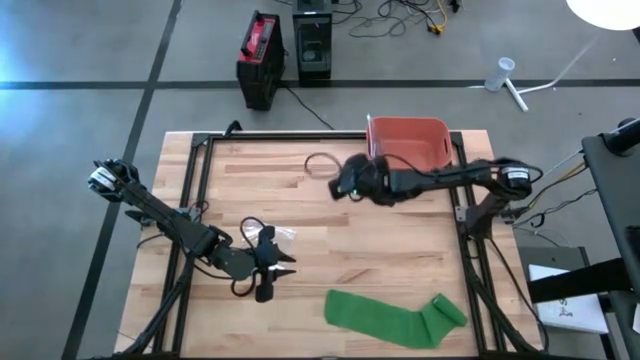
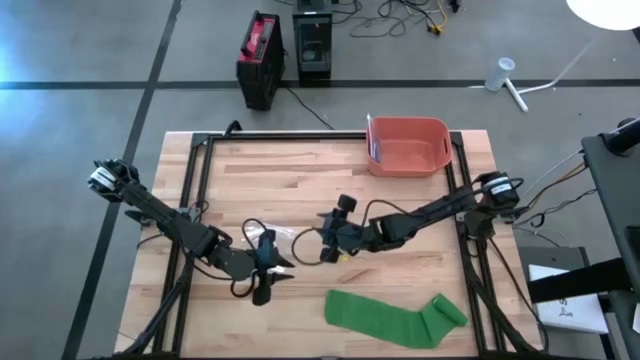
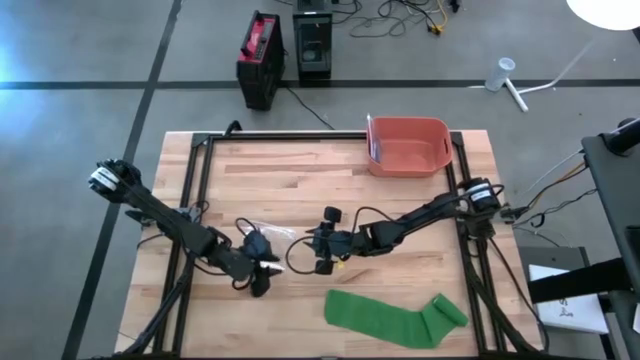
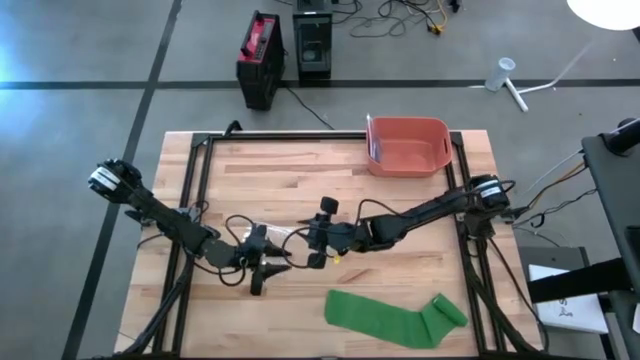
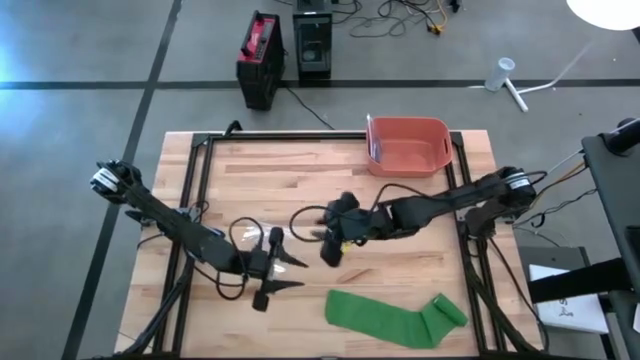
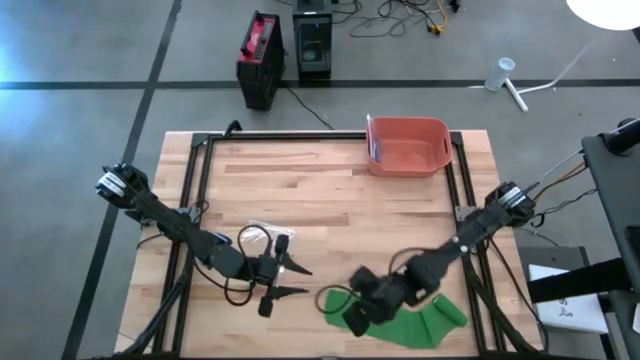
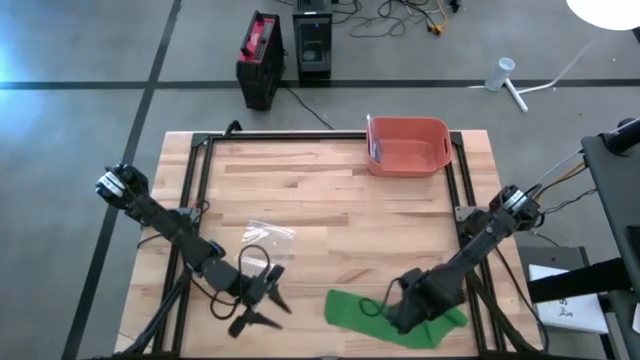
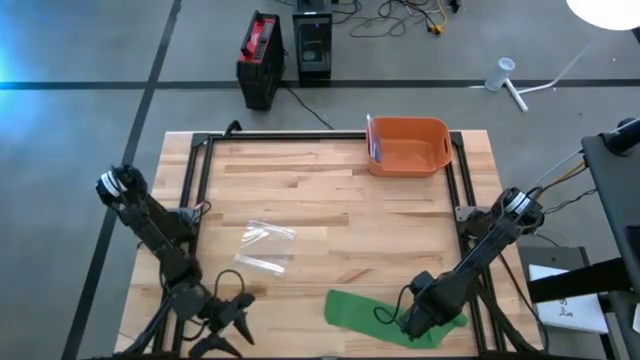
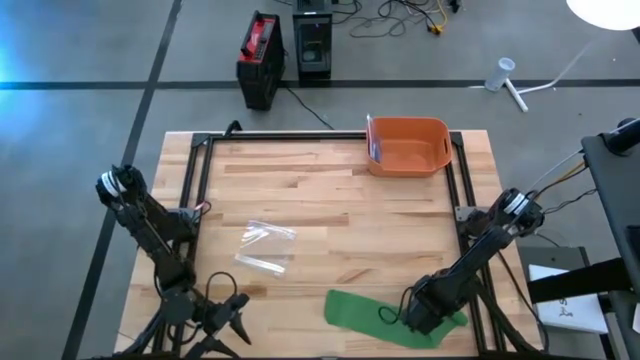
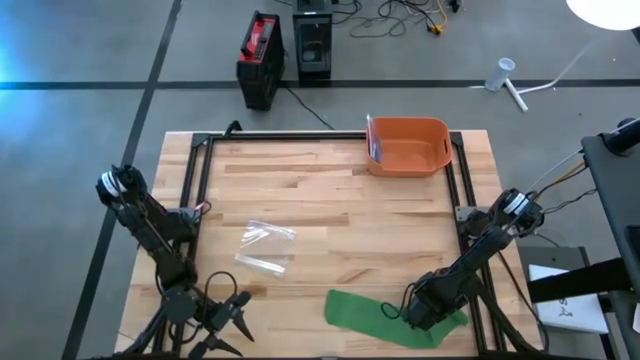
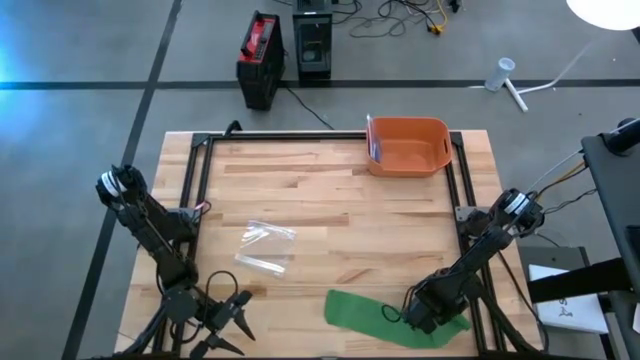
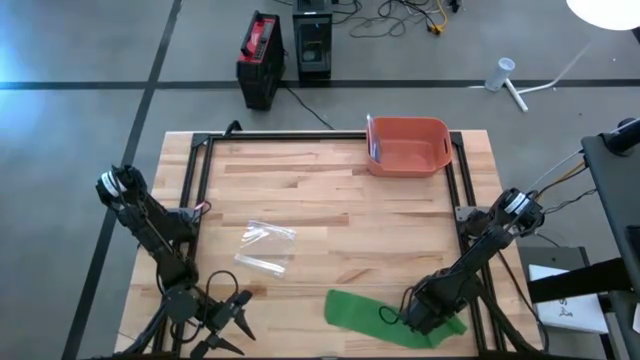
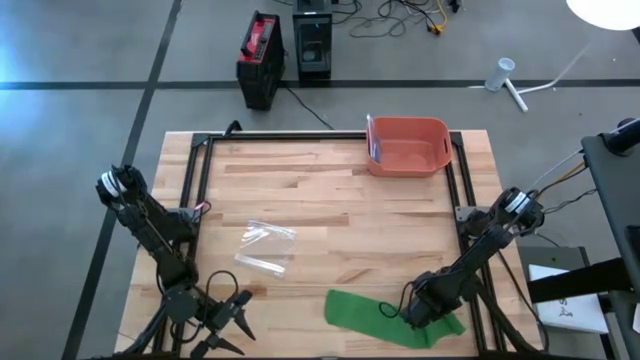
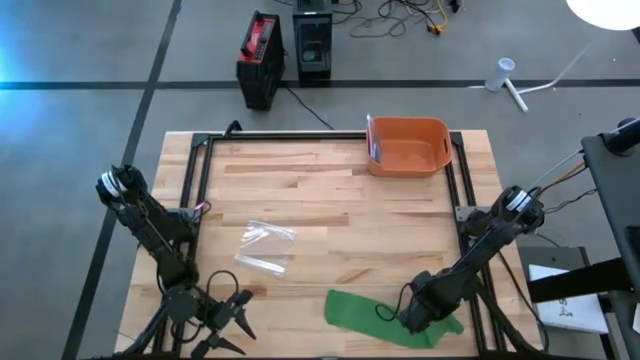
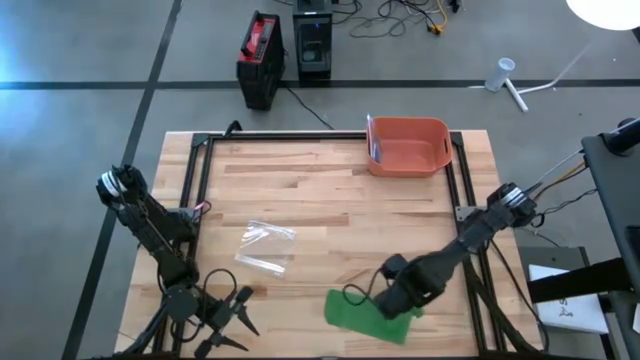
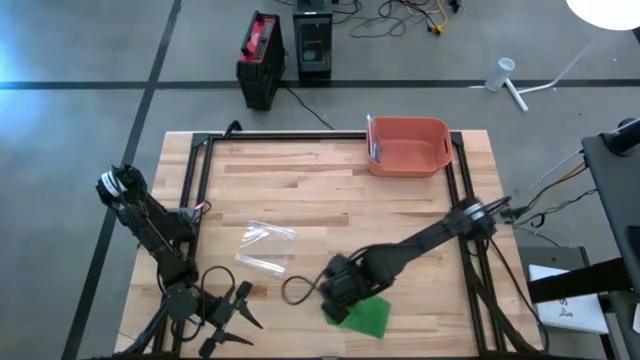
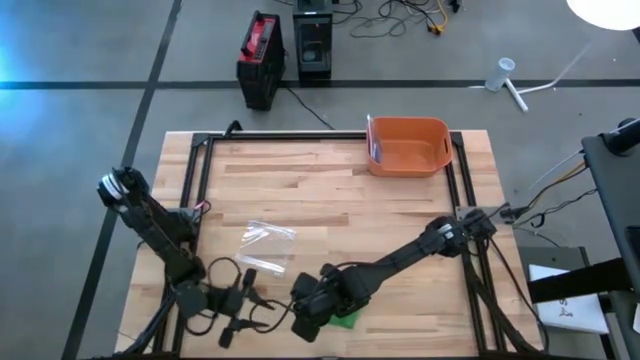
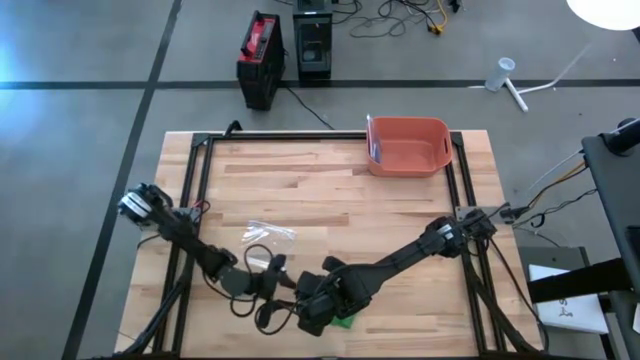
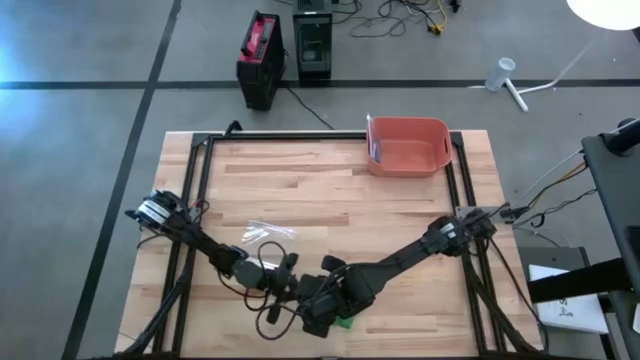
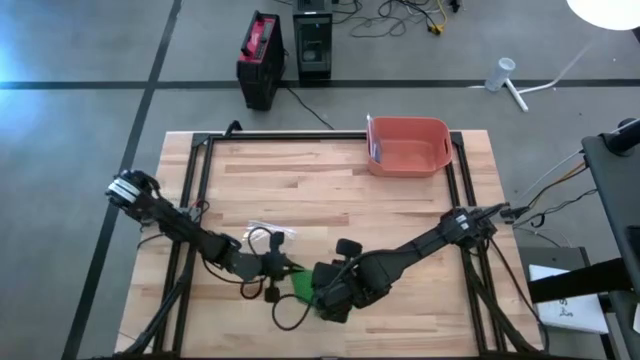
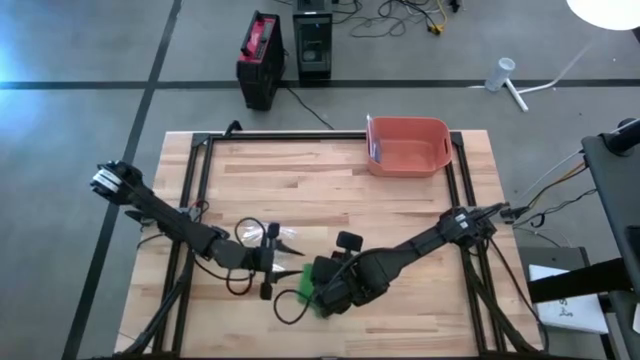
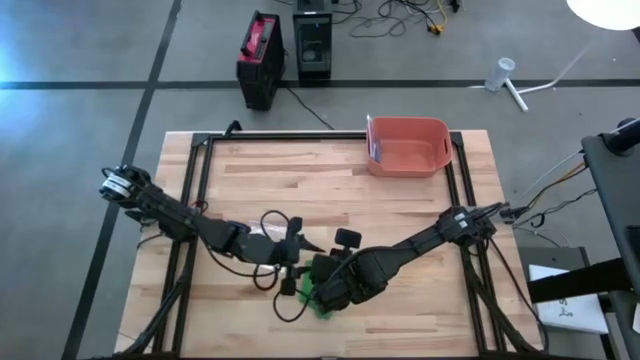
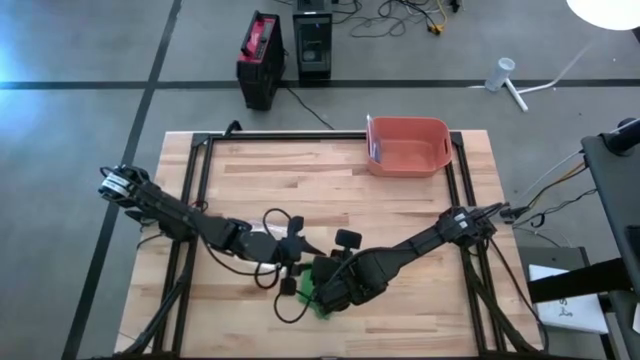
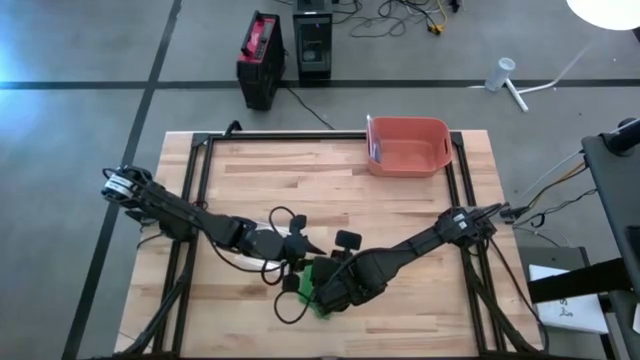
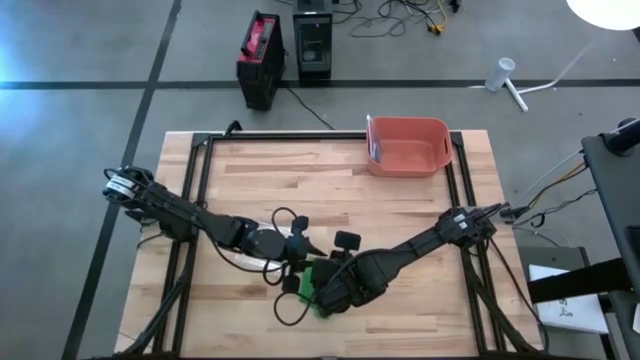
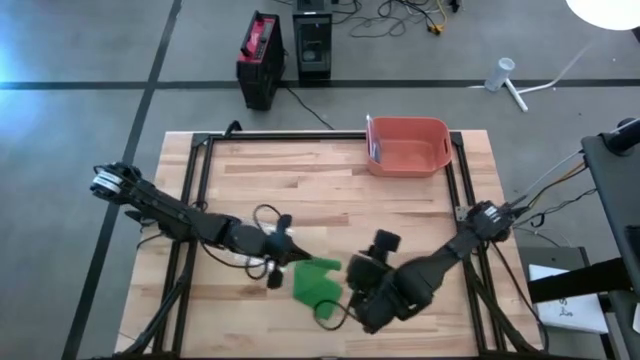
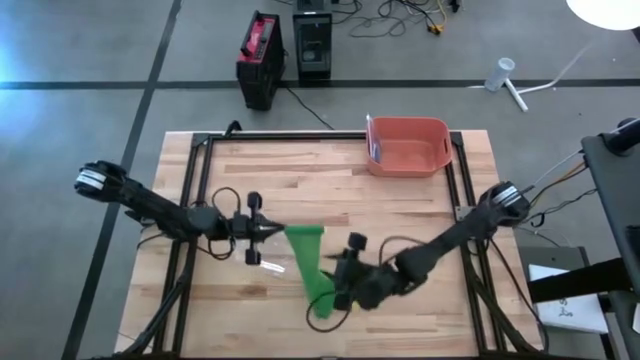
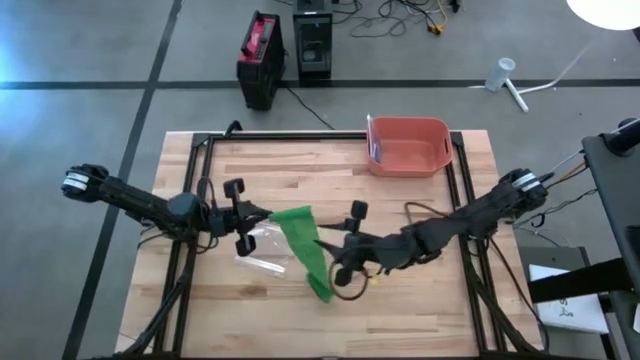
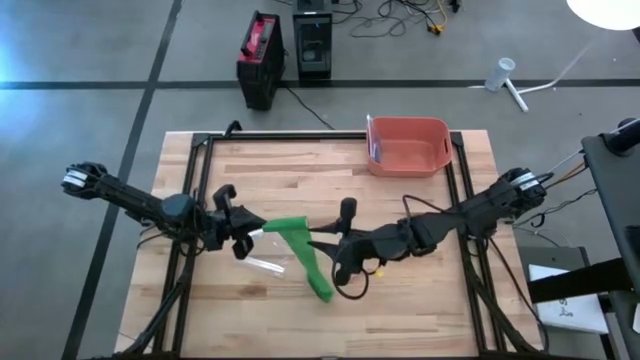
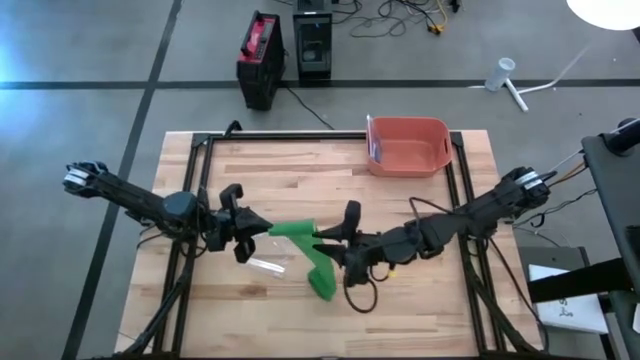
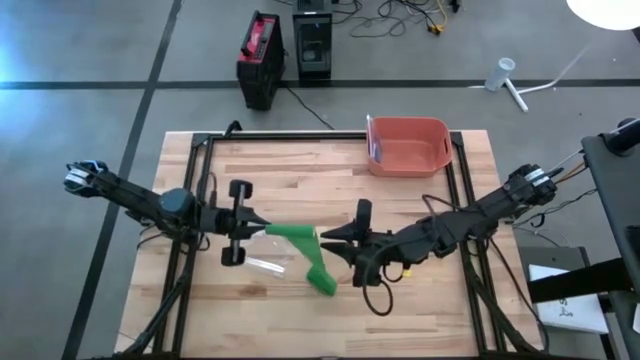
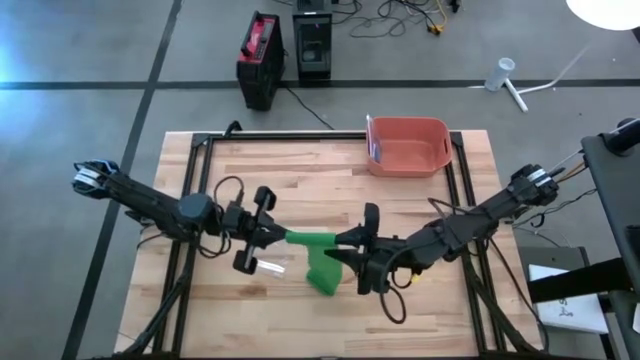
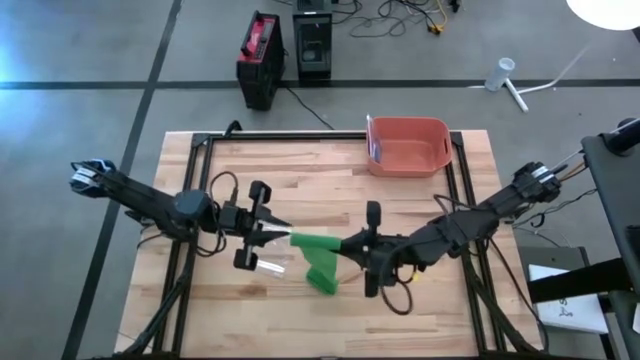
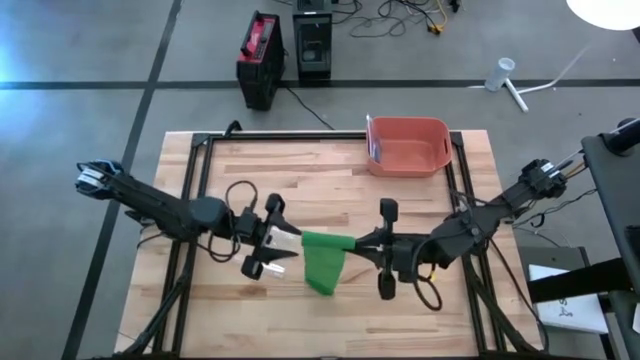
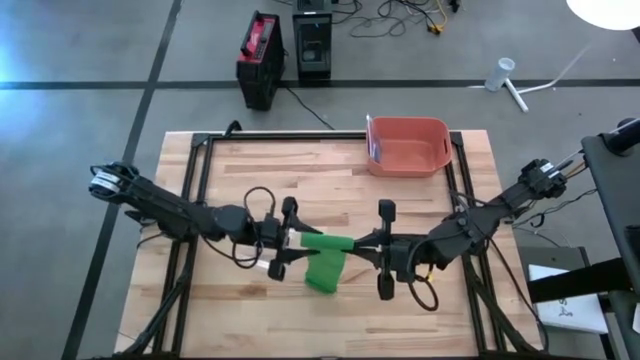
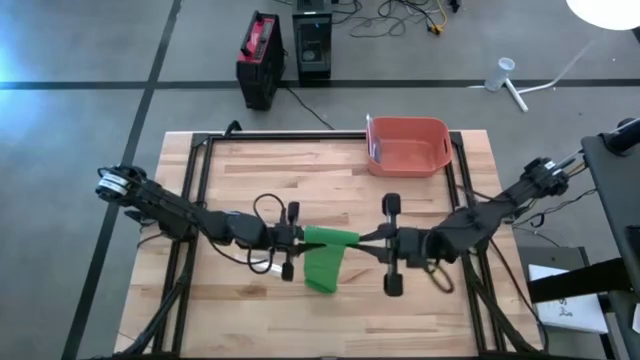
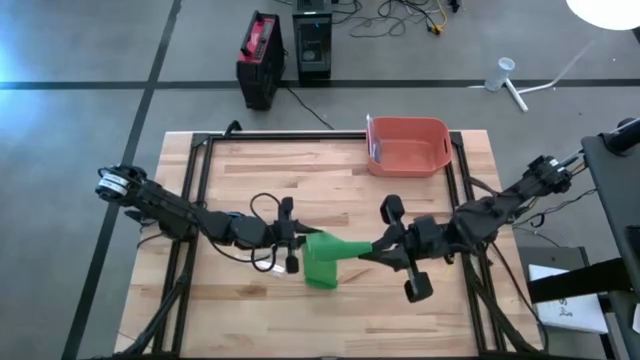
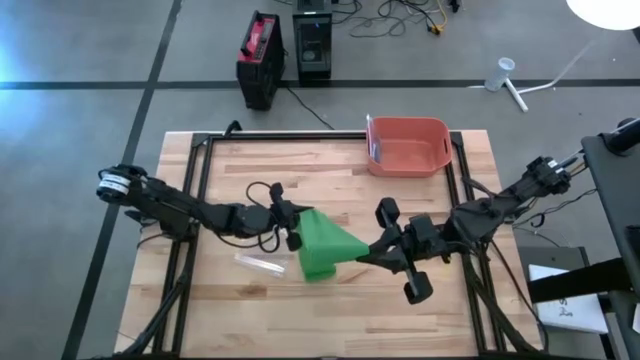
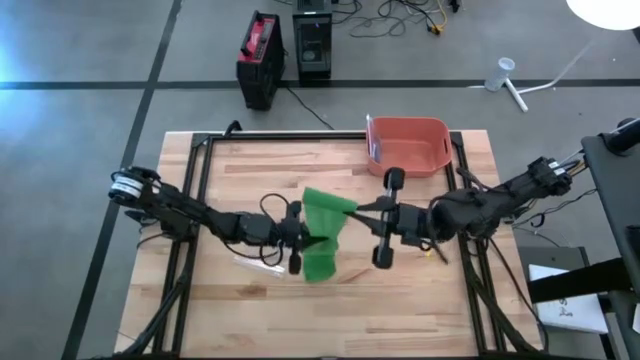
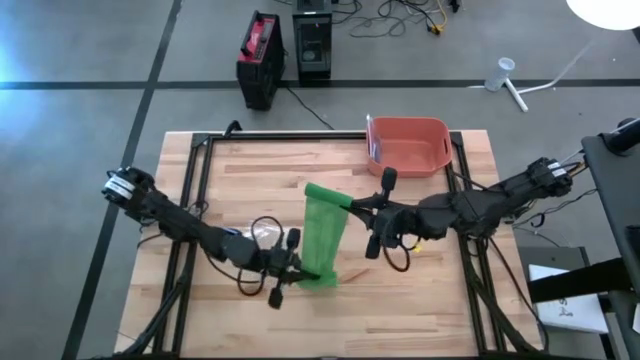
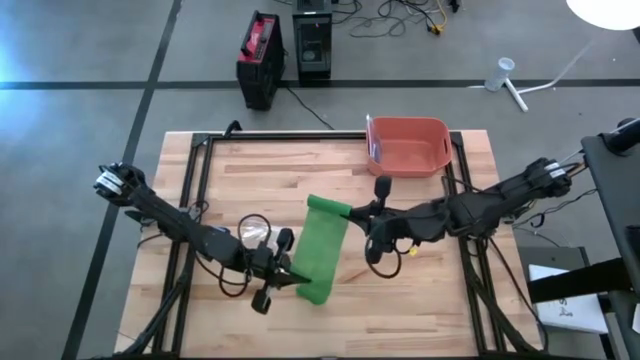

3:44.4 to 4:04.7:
Task: Roll bandage
Roll the green bandage
